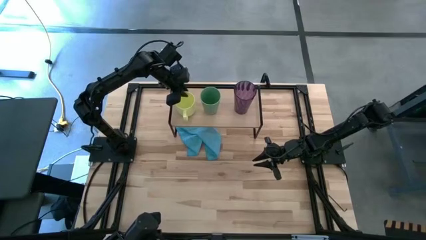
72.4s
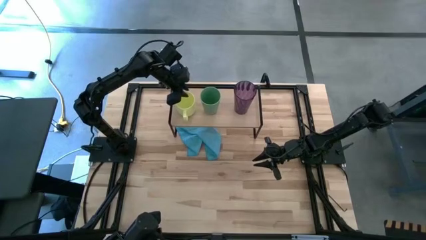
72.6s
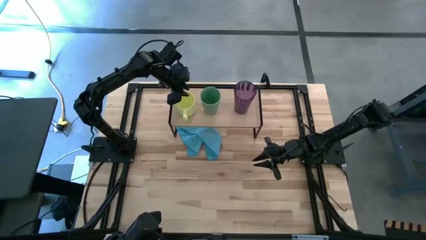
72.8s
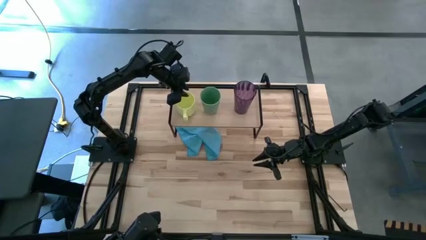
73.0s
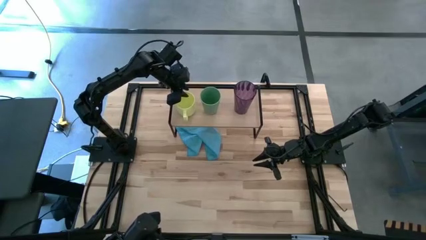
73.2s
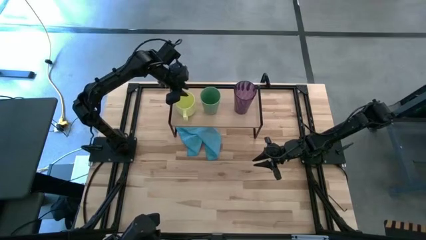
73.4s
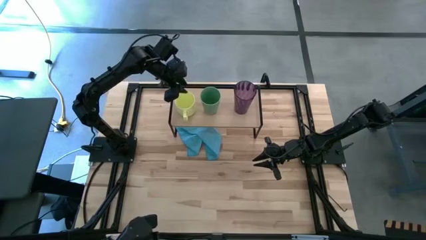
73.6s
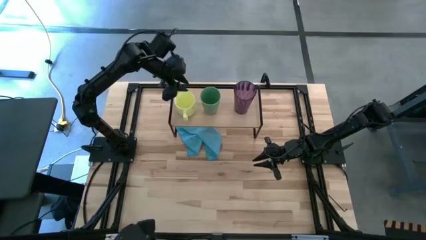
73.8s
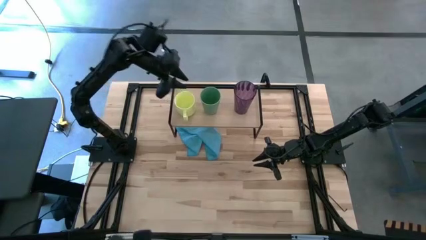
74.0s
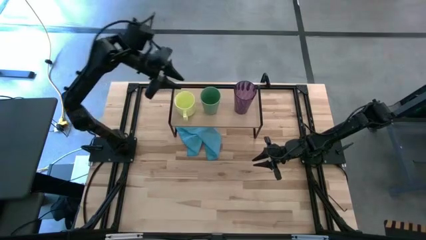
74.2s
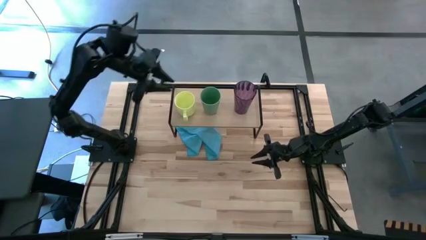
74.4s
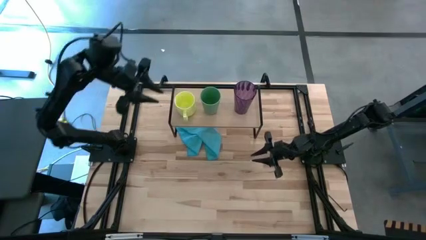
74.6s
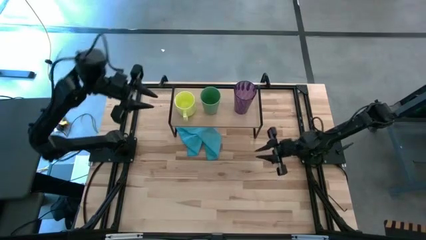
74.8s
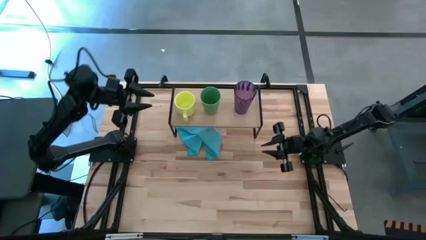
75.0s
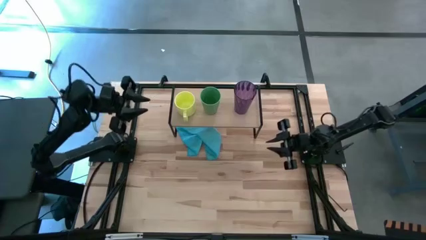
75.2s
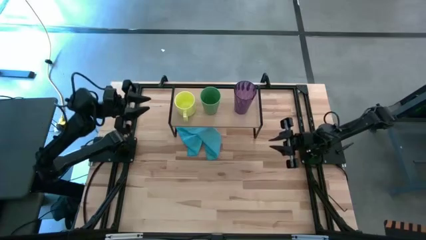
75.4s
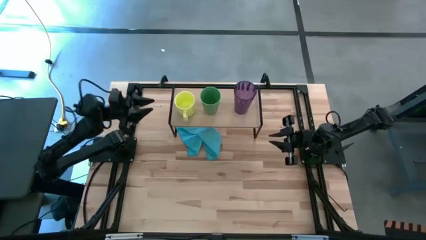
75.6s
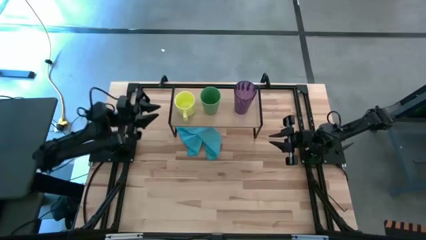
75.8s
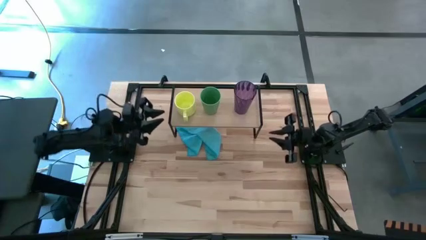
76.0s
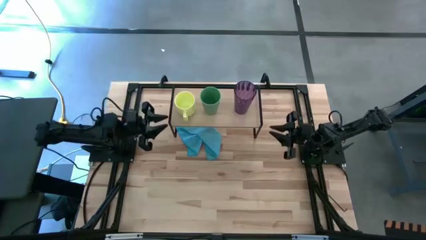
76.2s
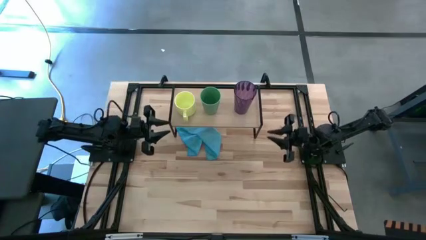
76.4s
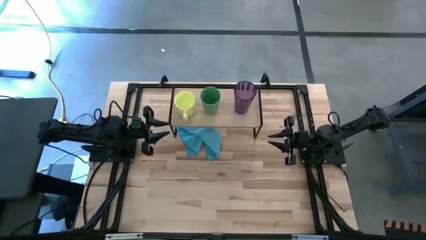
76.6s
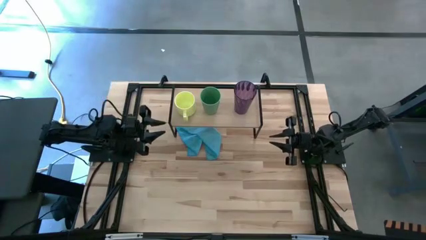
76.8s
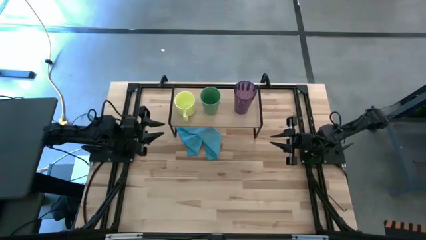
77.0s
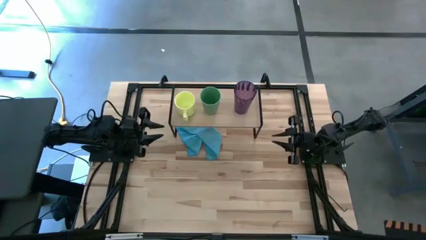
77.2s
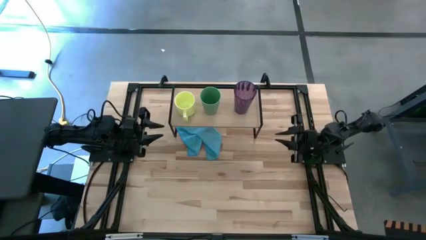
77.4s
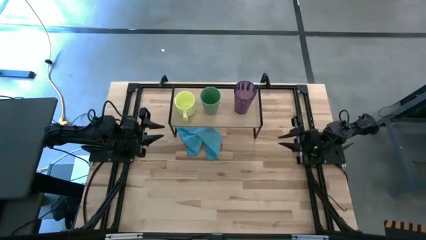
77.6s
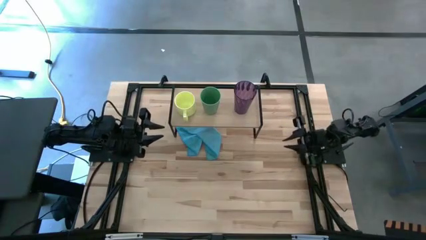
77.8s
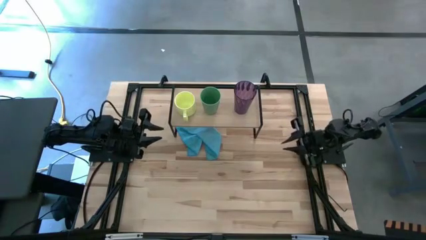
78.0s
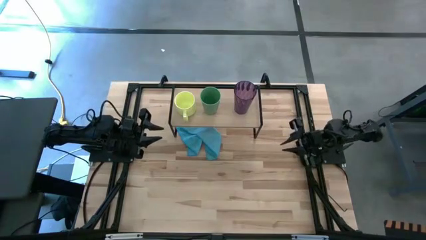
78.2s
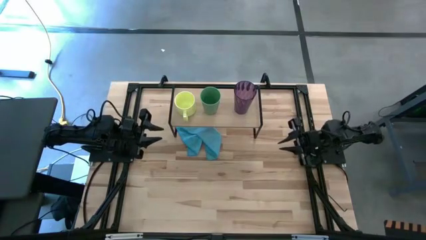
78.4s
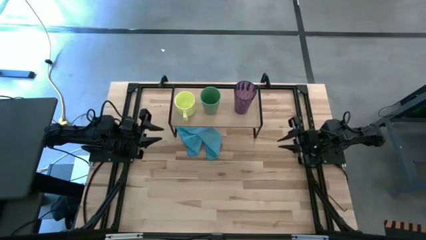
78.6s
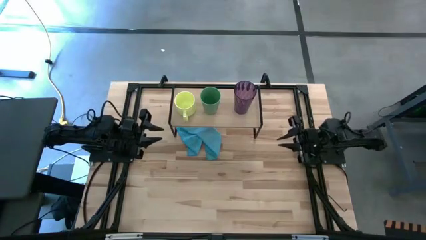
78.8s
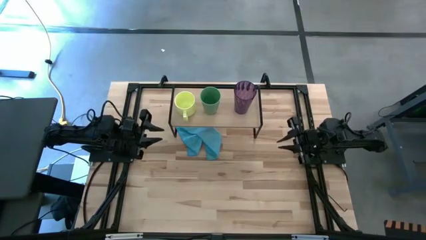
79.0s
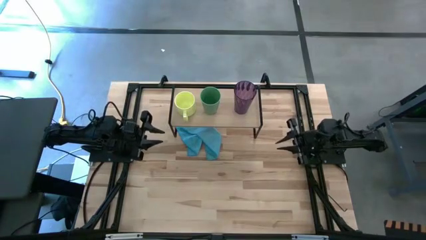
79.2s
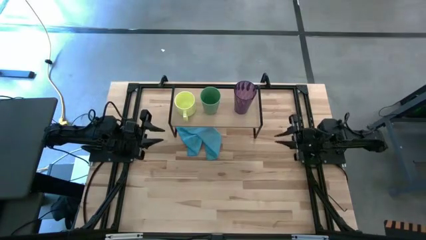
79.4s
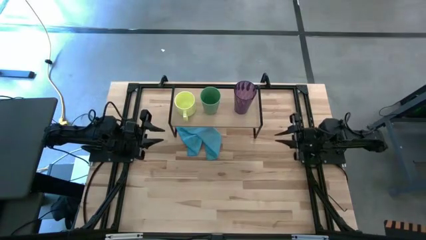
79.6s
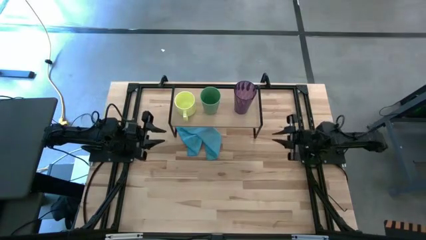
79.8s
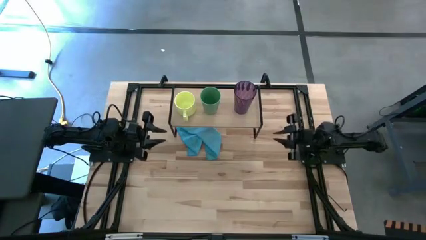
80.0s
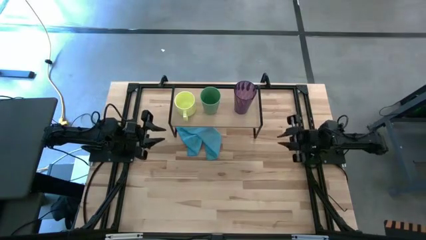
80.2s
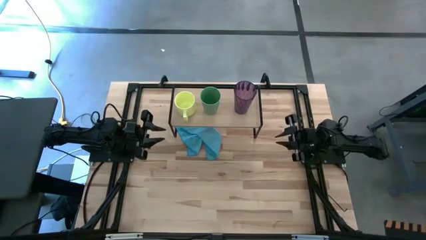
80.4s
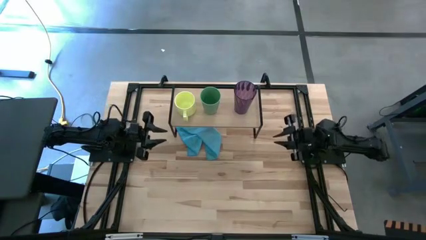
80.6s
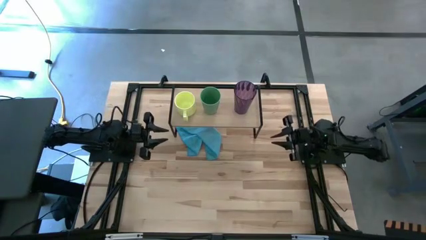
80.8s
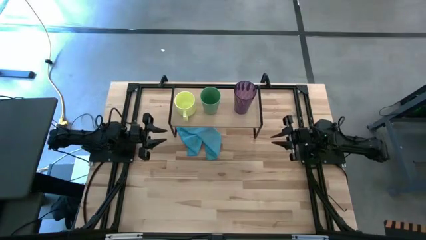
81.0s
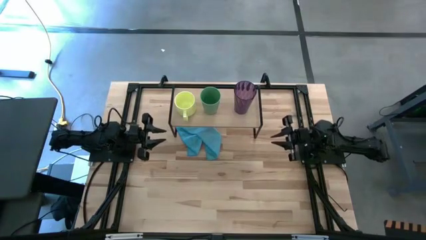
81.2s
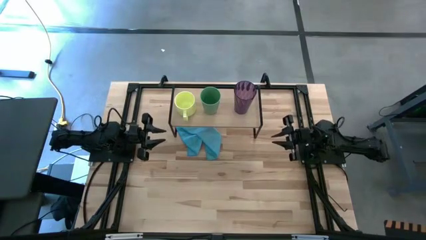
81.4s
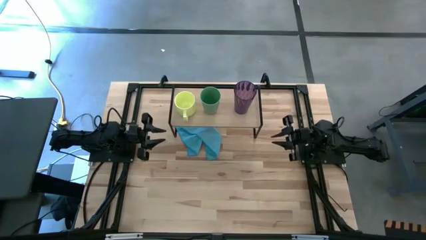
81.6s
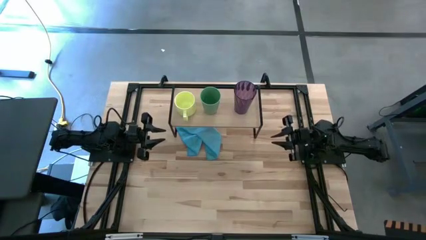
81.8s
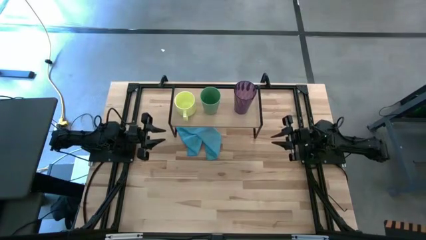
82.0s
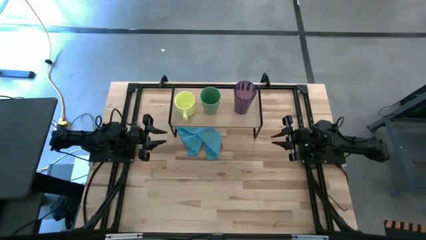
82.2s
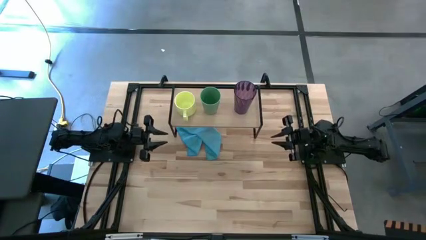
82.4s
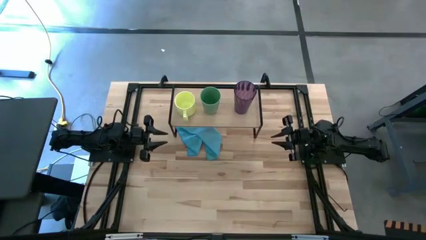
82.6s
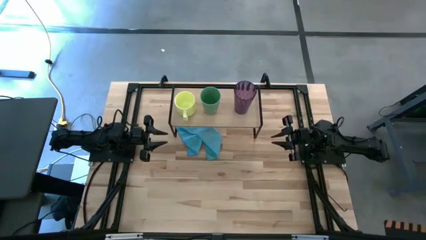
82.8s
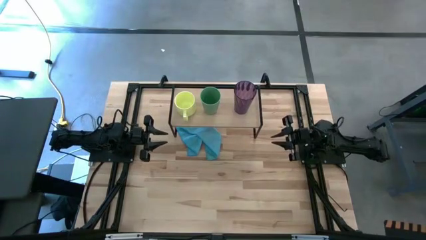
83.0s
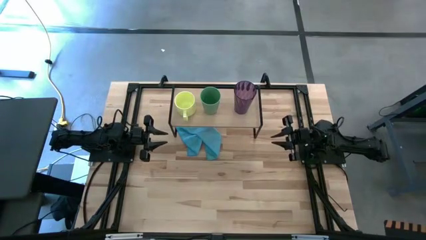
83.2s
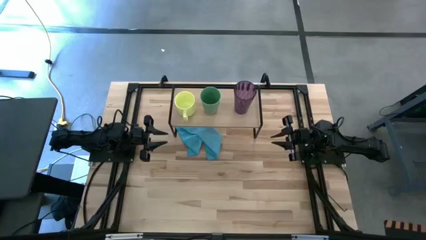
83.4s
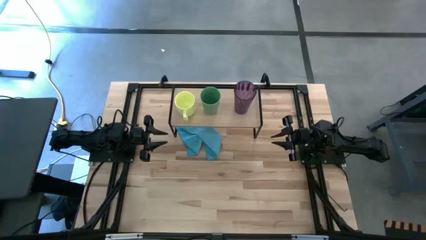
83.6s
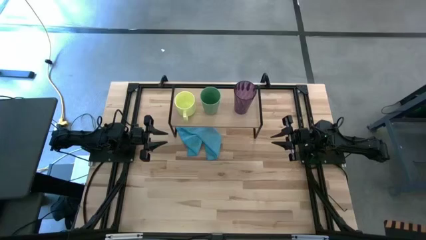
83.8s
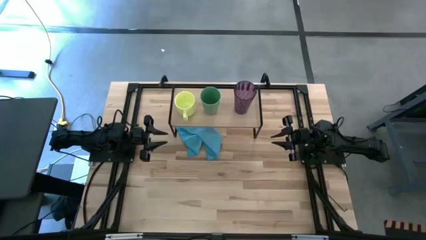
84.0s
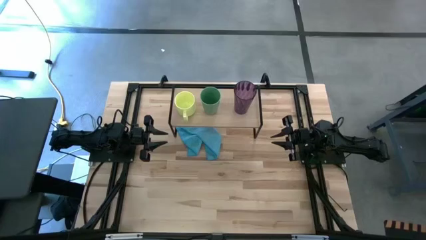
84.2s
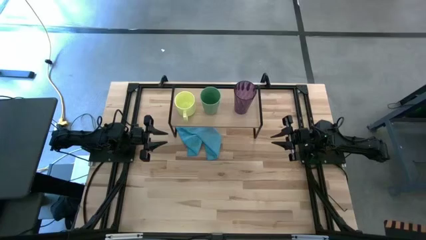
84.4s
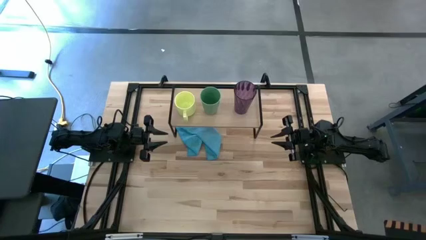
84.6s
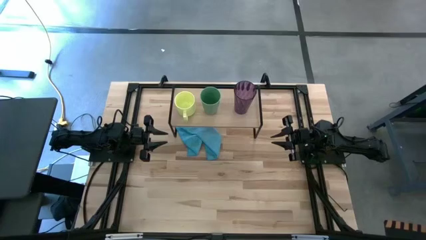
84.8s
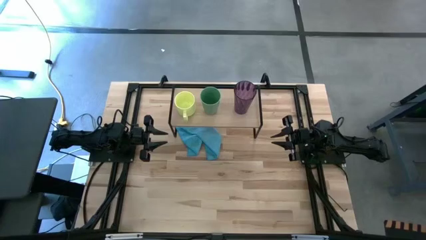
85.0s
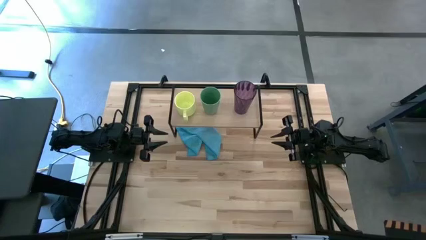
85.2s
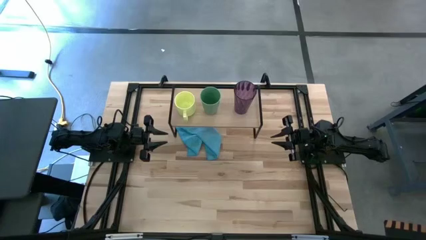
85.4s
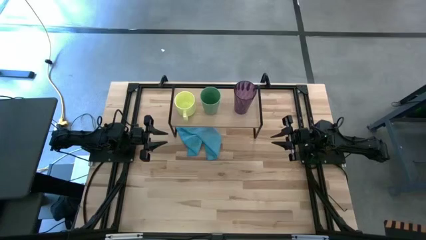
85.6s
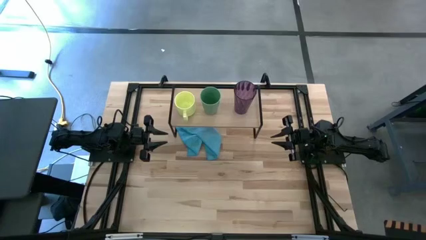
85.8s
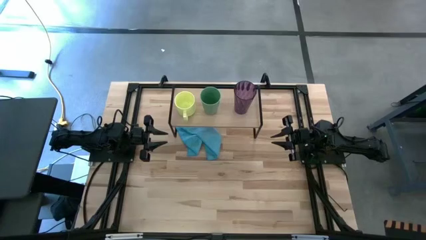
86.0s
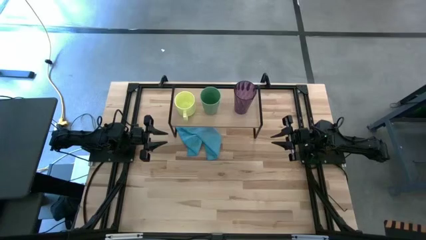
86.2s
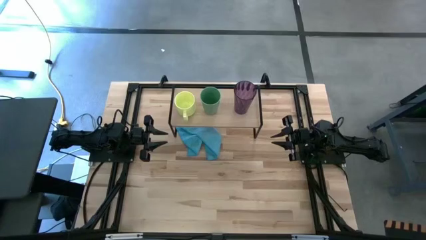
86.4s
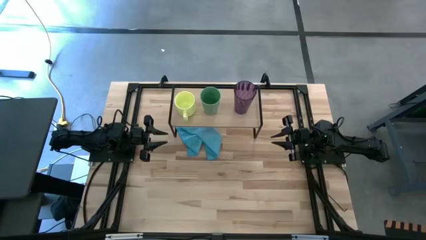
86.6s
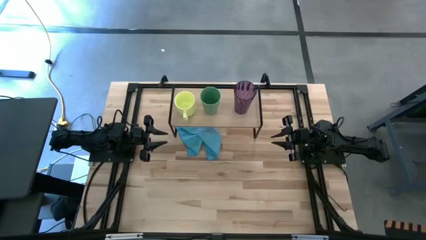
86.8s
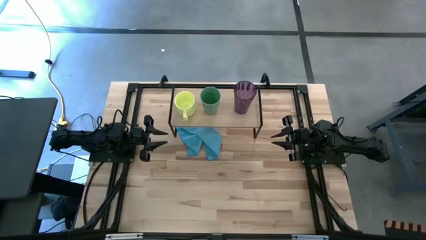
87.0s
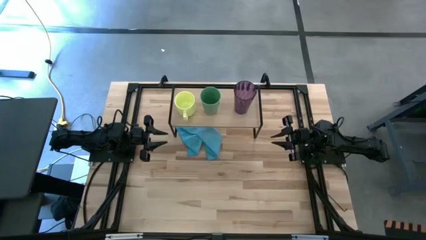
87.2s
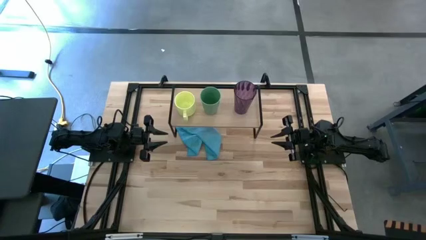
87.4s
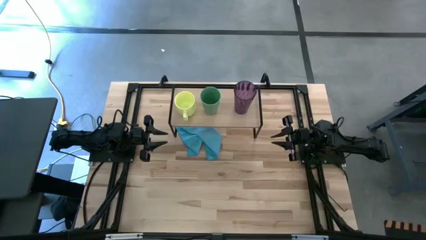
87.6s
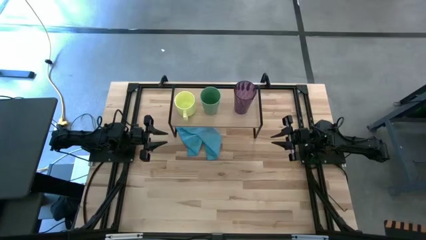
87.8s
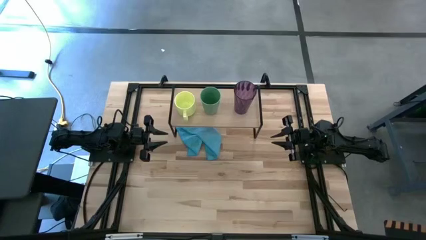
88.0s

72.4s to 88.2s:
Task: Stack small to large cups/mugs on shelf
Return to Home Position
